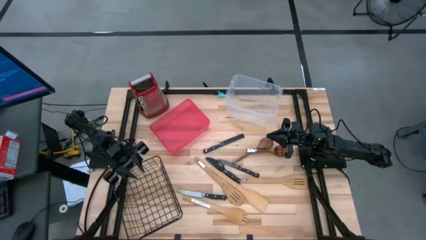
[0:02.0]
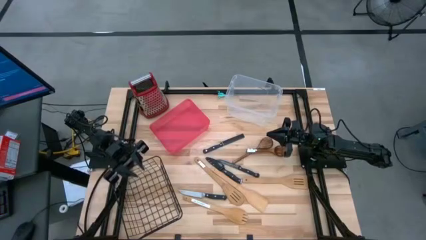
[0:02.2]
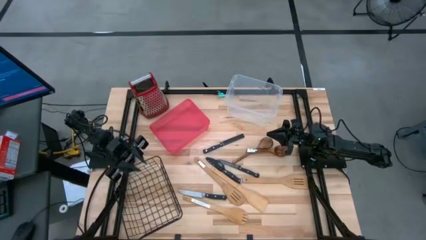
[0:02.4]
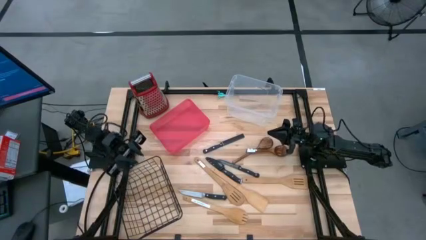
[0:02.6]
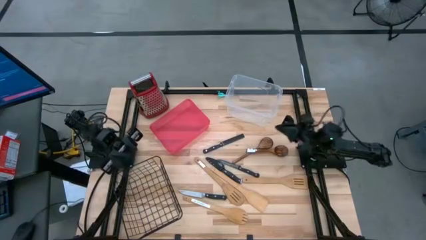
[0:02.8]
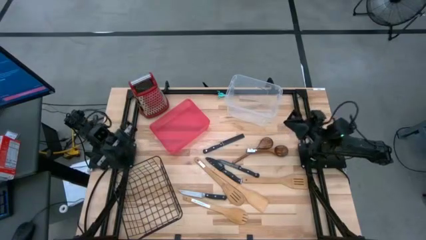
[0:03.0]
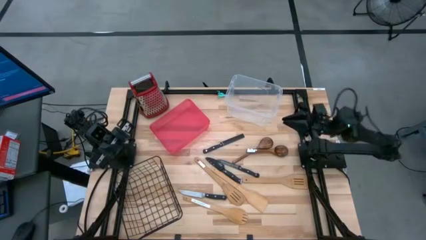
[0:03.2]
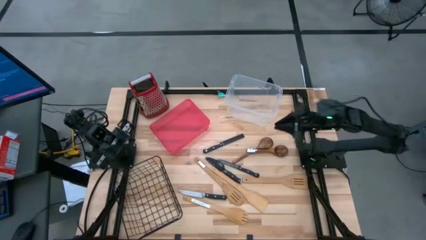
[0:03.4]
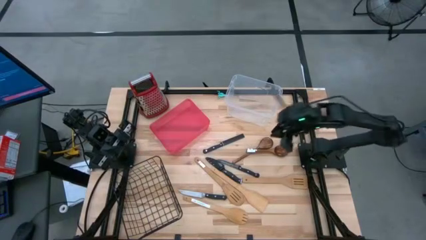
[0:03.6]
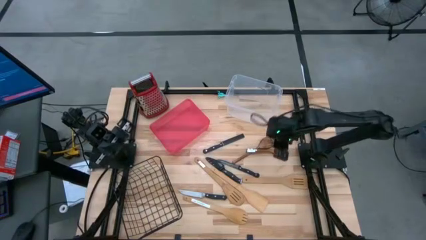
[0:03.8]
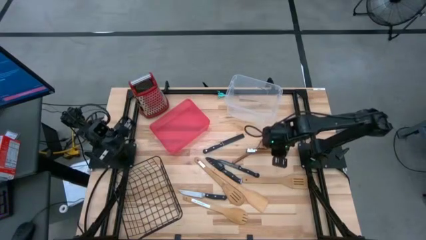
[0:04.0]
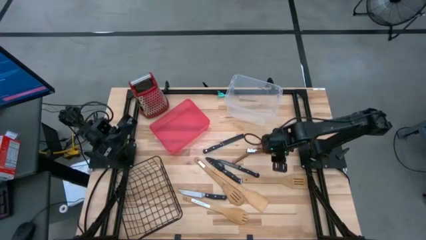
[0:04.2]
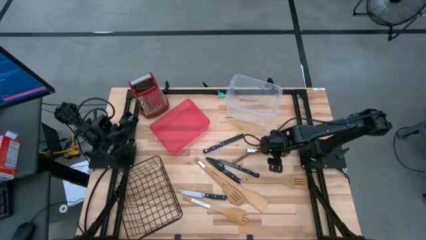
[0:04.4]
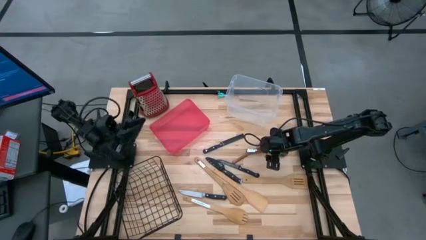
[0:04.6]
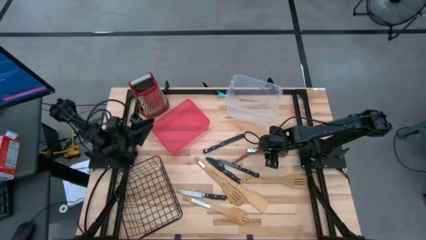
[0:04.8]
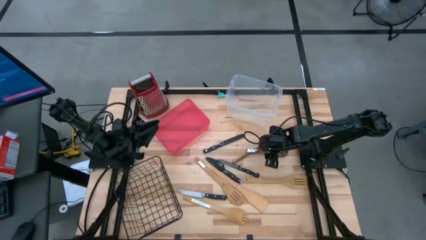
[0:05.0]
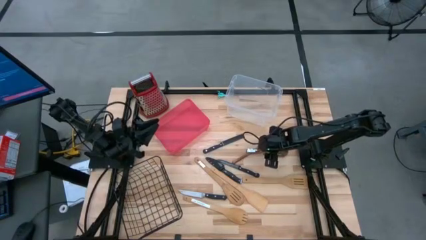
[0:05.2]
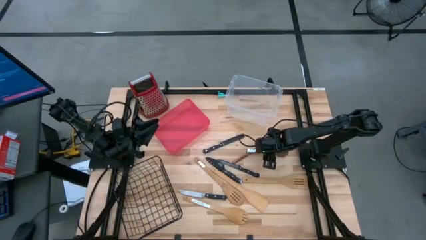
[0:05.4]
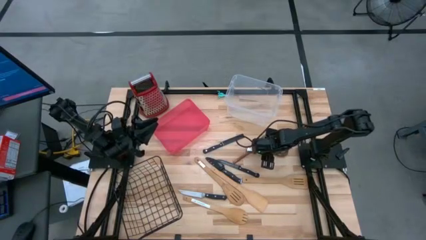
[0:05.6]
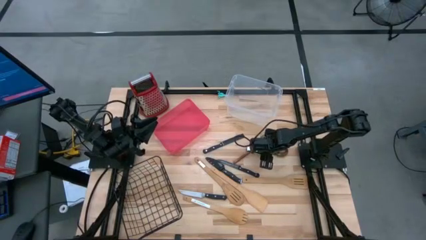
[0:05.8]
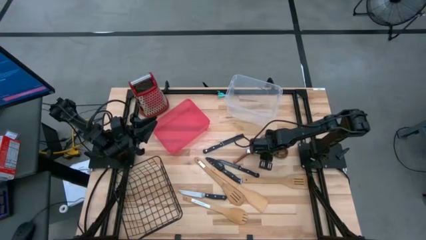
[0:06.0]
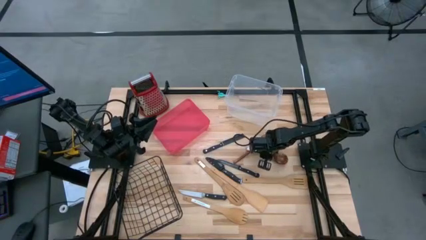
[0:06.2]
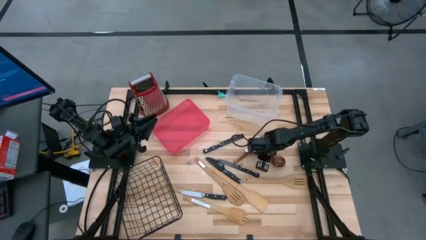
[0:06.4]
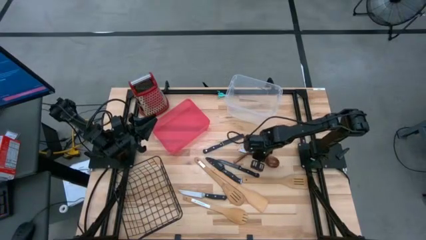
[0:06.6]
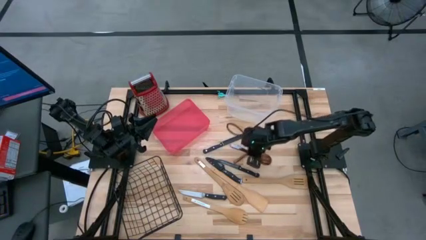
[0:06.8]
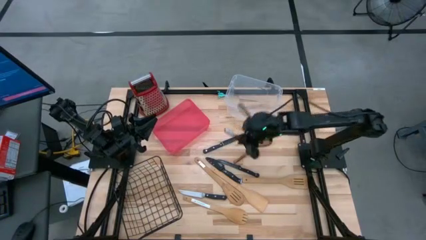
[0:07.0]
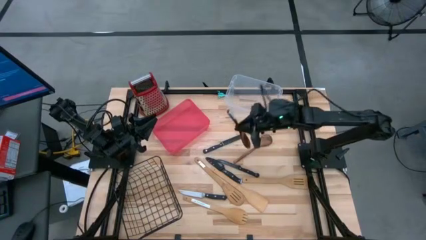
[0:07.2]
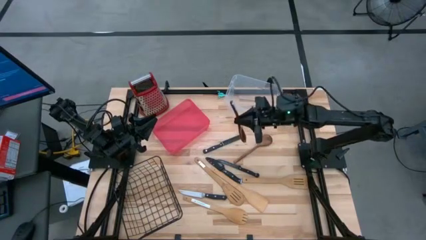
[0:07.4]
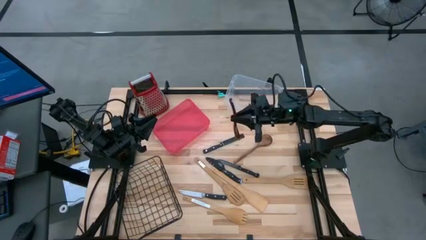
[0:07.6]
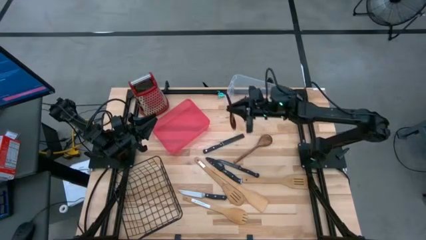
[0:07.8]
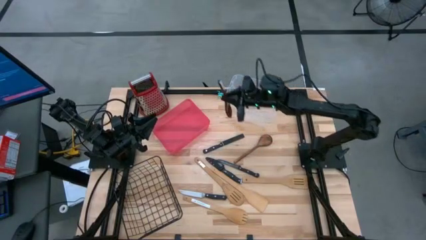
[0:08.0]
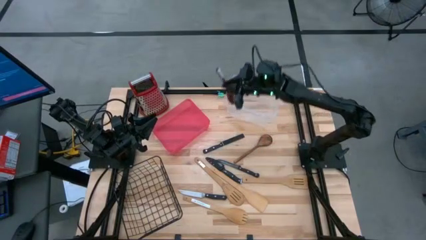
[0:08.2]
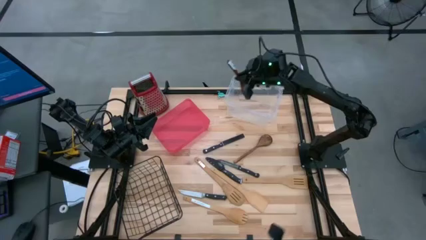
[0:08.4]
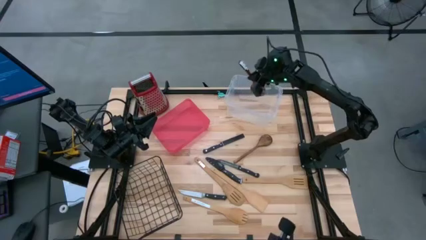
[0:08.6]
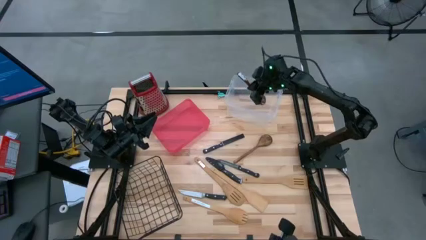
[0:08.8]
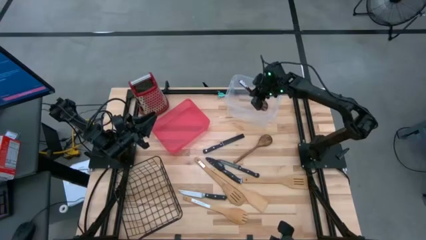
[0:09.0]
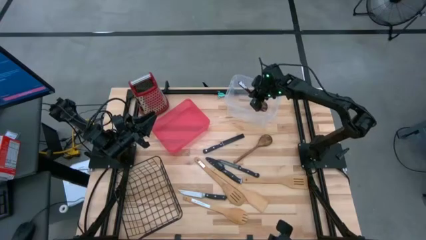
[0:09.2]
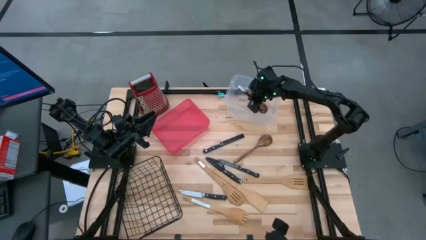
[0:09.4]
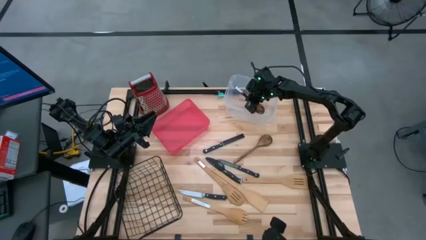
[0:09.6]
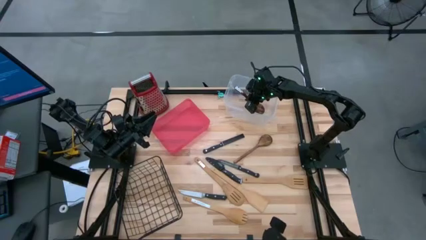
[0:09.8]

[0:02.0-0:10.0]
Task: Pick & Place Kitchen Items
Put the wooden serving spoon into the transparent bin

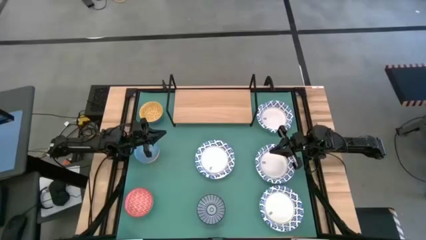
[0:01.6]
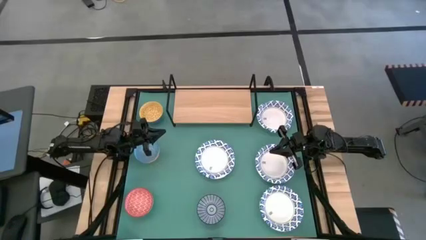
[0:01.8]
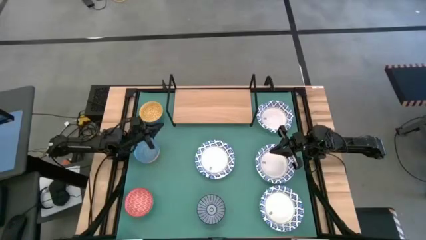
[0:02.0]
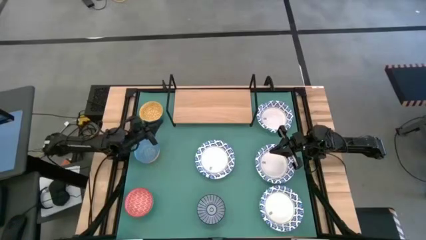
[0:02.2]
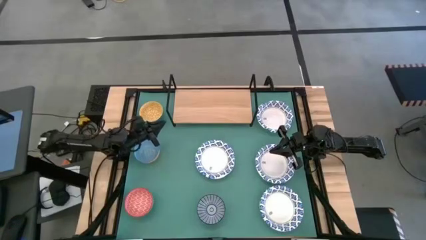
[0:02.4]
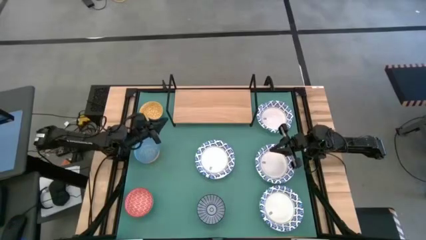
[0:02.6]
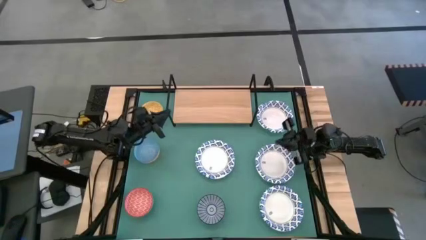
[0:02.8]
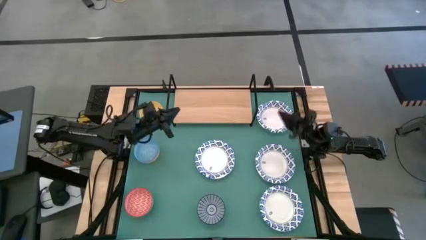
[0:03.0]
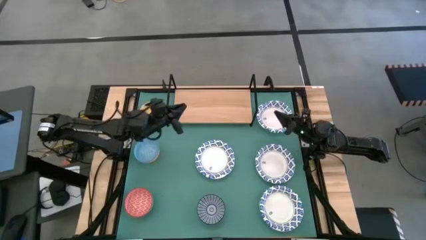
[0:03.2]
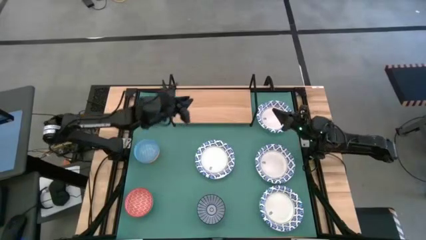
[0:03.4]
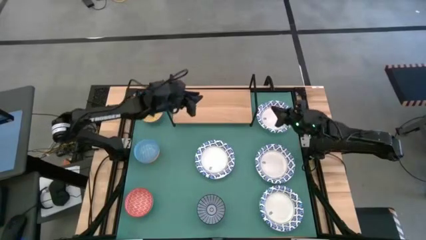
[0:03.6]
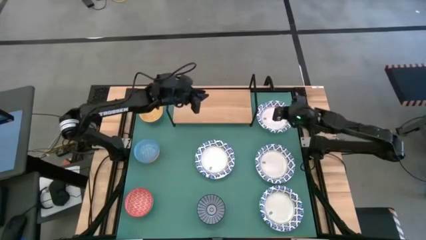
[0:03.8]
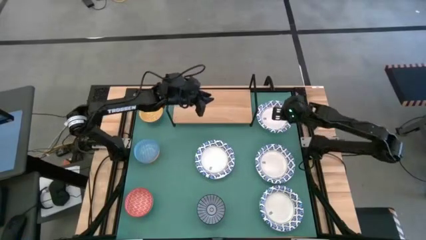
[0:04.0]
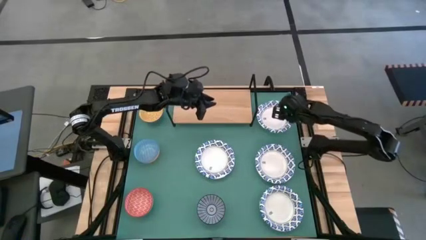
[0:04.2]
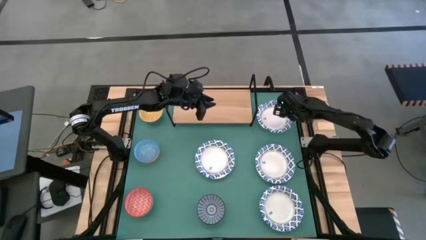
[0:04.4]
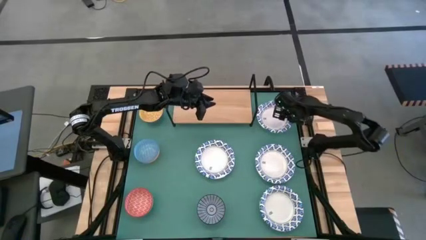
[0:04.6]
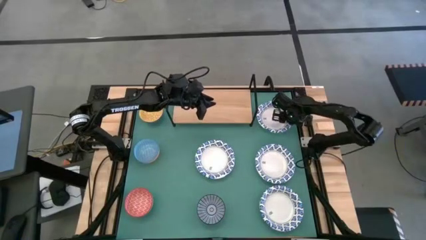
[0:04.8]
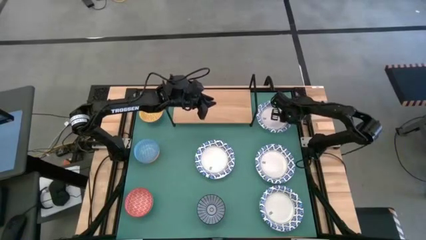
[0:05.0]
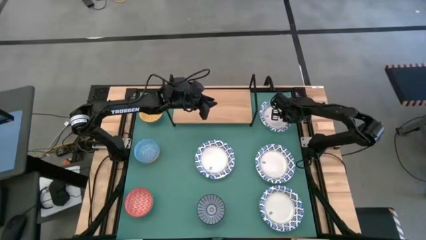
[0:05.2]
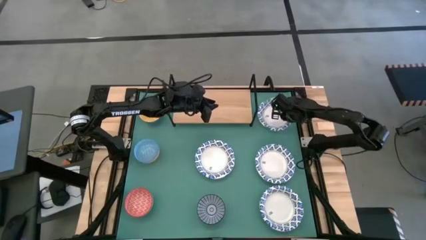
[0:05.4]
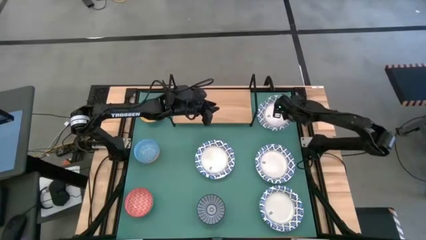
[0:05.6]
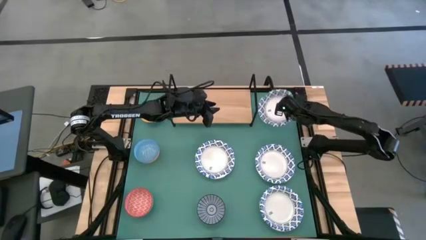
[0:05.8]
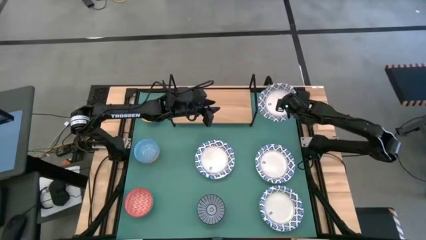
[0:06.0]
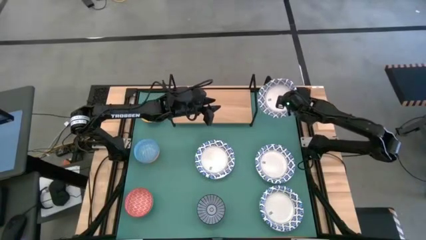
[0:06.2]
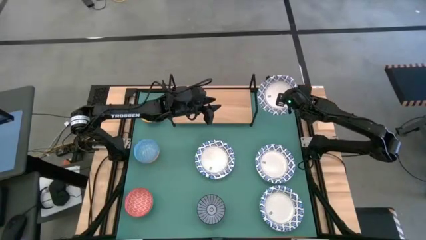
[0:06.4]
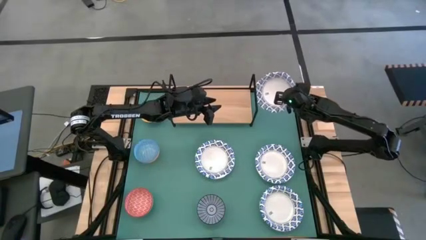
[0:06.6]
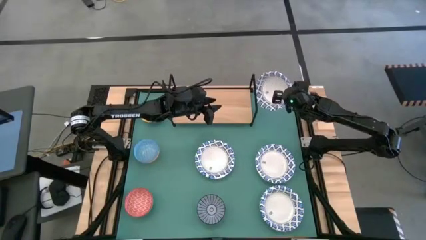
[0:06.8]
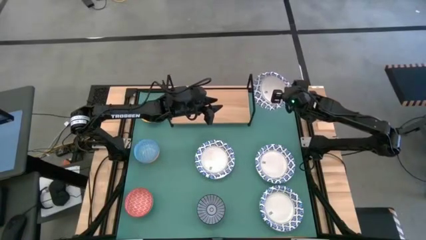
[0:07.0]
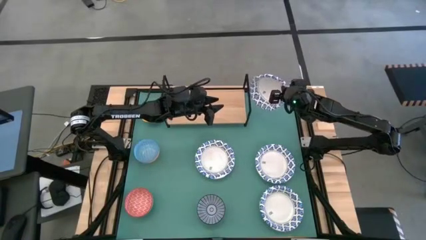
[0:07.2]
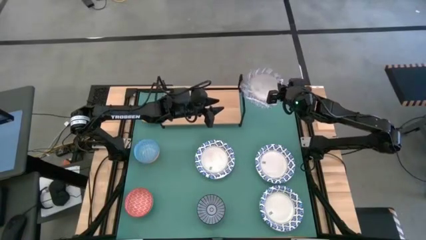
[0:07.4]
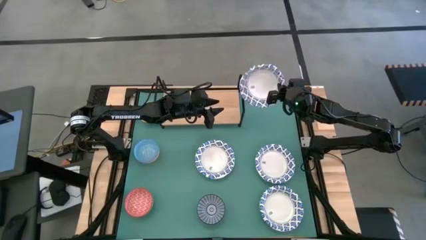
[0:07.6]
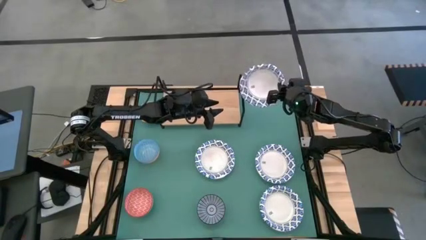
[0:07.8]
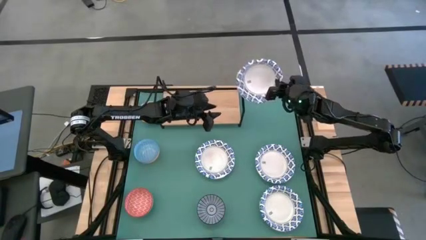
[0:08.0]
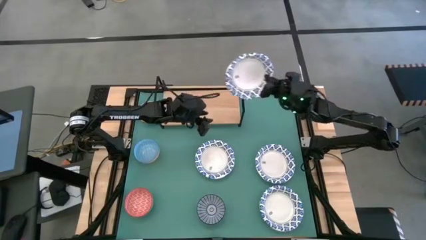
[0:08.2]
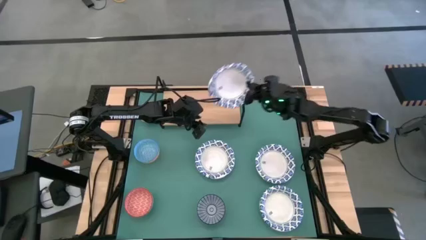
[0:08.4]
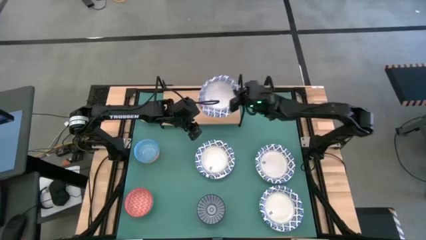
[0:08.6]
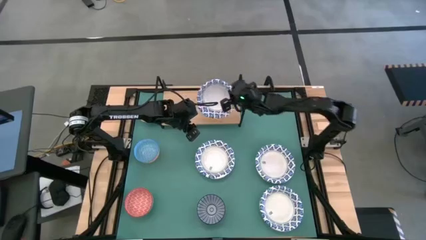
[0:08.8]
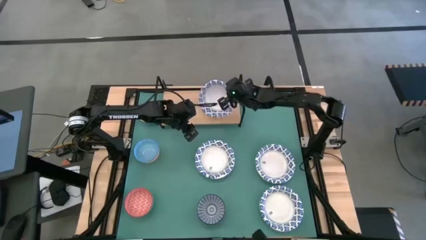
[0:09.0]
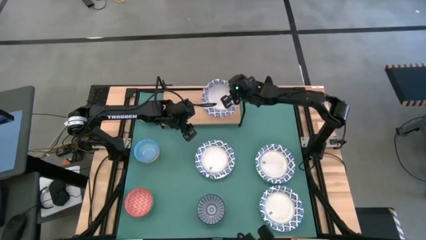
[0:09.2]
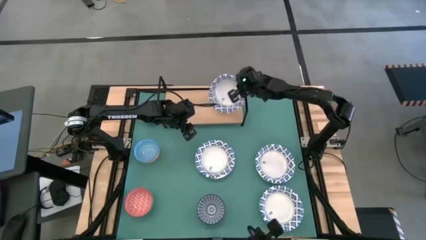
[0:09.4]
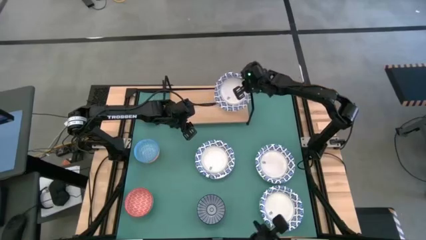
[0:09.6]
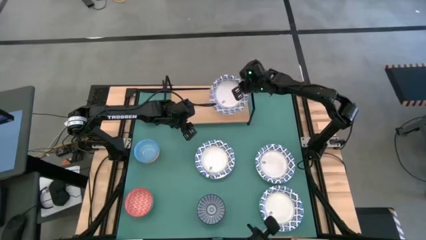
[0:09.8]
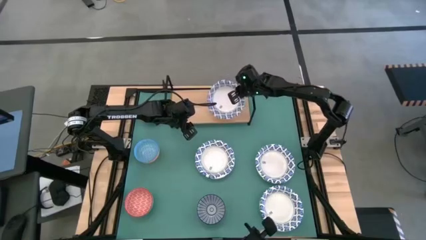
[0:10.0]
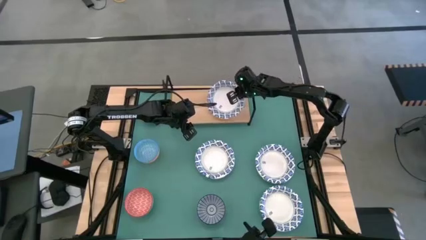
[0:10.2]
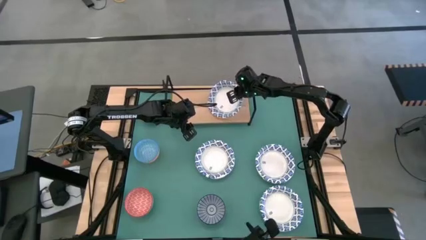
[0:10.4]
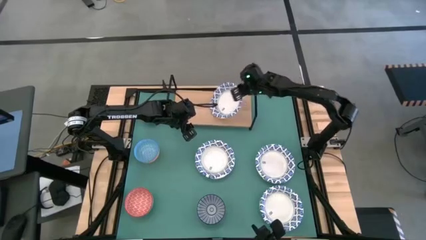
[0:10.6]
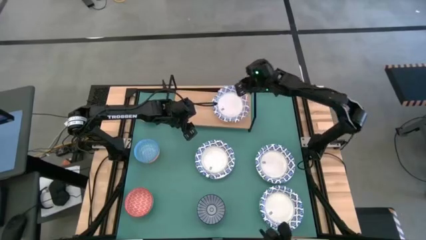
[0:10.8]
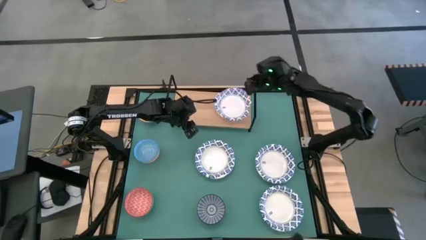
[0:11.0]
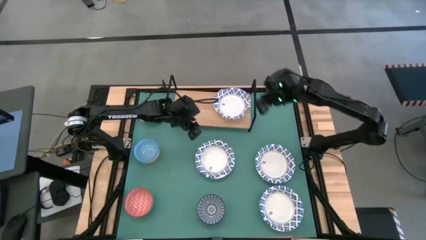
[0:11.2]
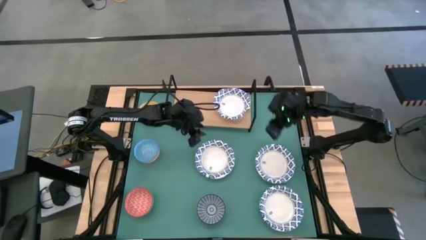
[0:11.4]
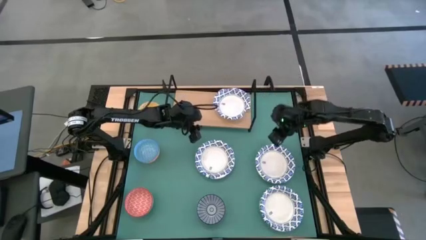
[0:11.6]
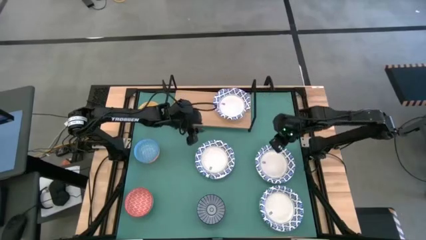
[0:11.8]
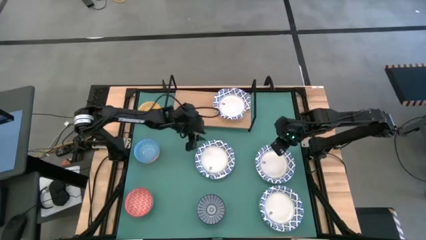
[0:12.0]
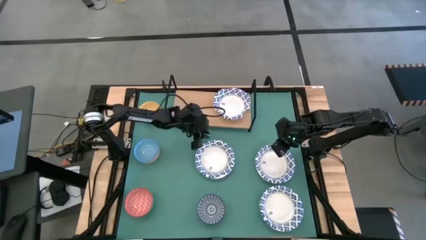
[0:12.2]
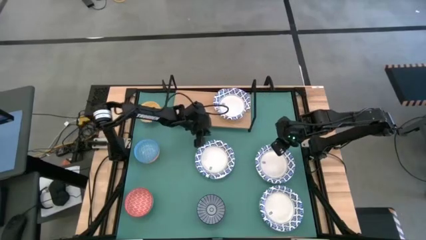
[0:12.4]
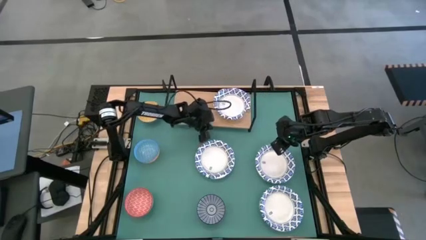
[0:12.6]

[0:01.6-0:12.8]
Task: Place and stack bowls onto a shelf
Put the top blue and white bowl on the shelf
